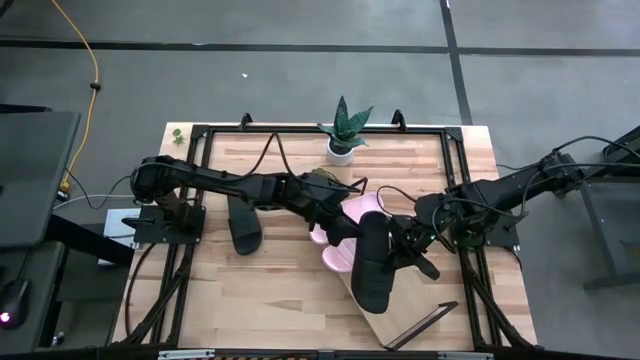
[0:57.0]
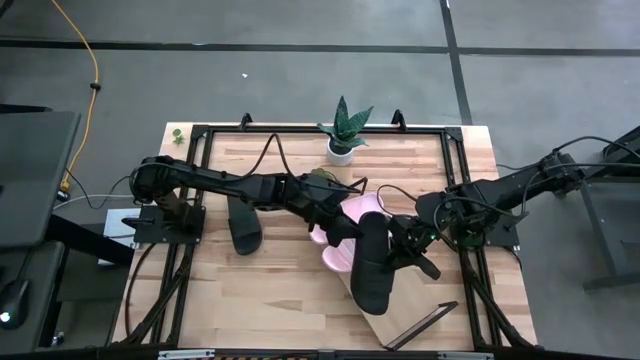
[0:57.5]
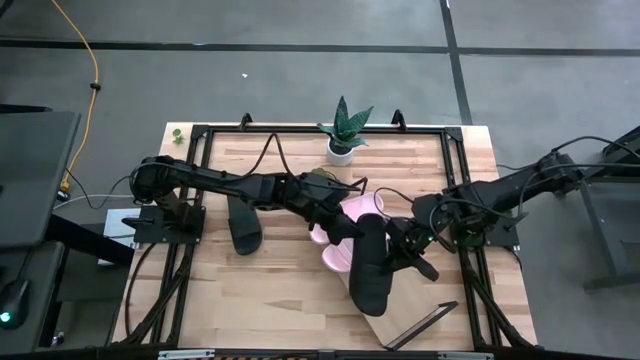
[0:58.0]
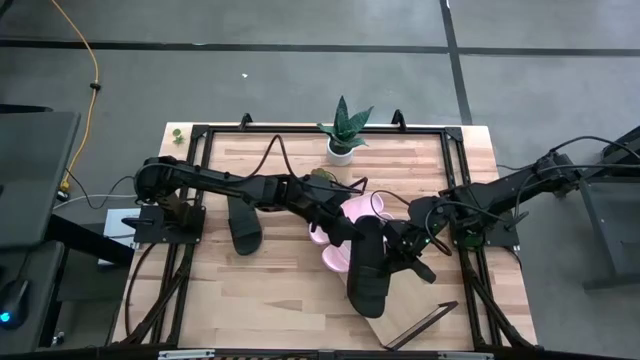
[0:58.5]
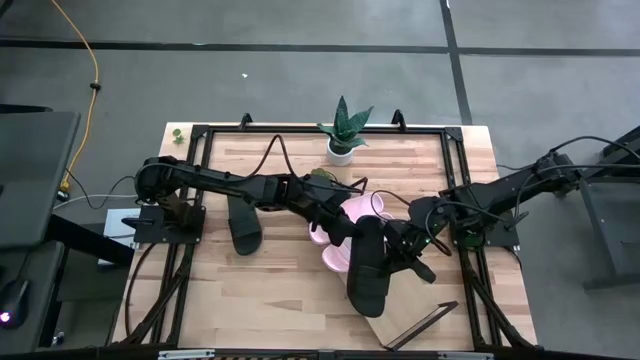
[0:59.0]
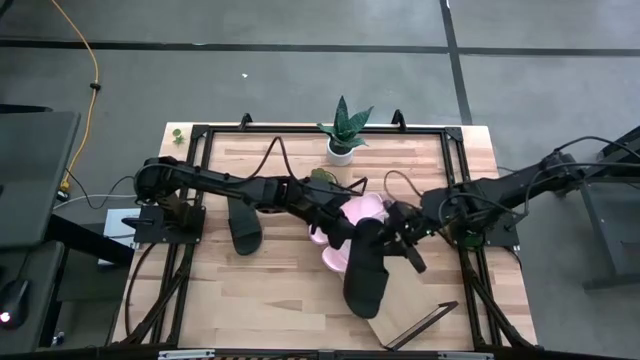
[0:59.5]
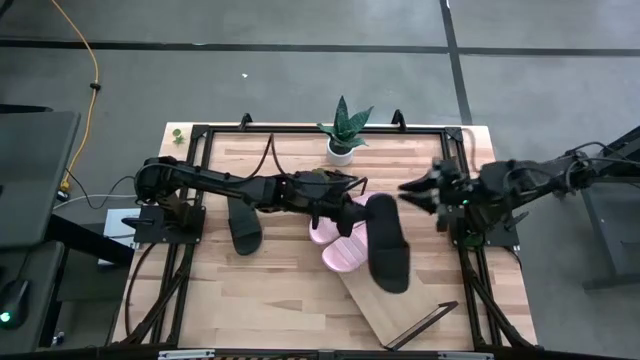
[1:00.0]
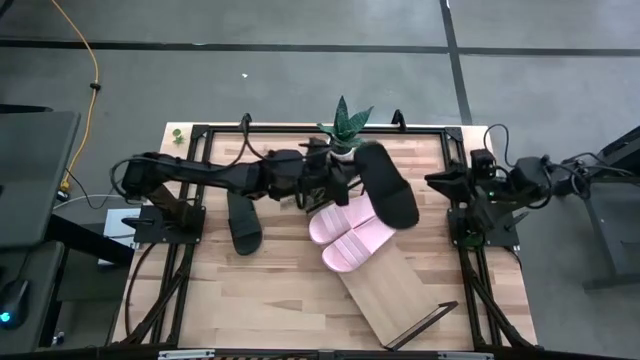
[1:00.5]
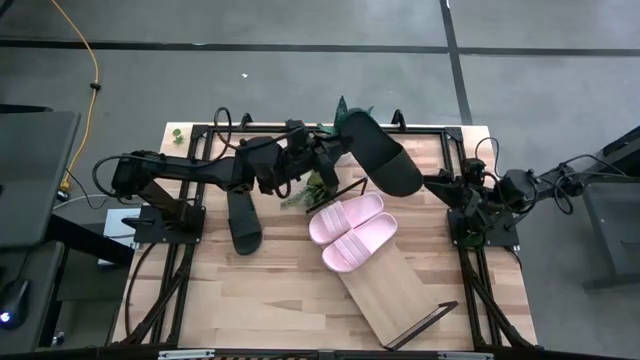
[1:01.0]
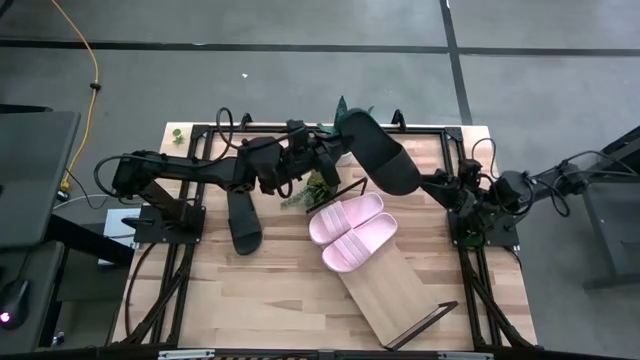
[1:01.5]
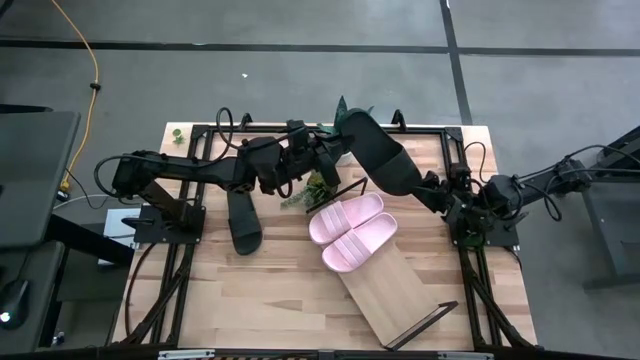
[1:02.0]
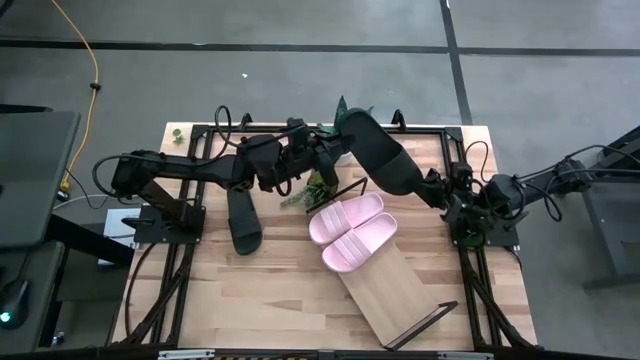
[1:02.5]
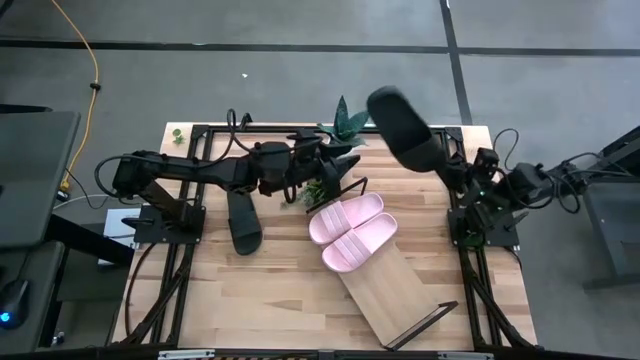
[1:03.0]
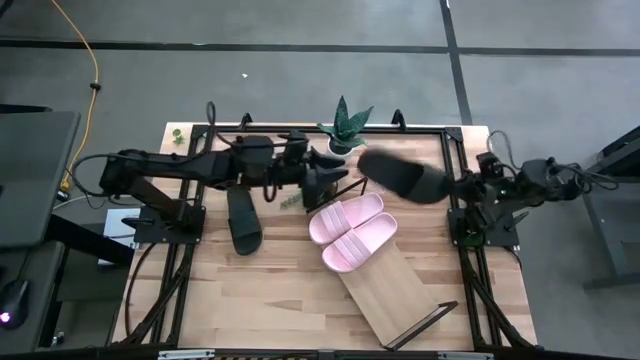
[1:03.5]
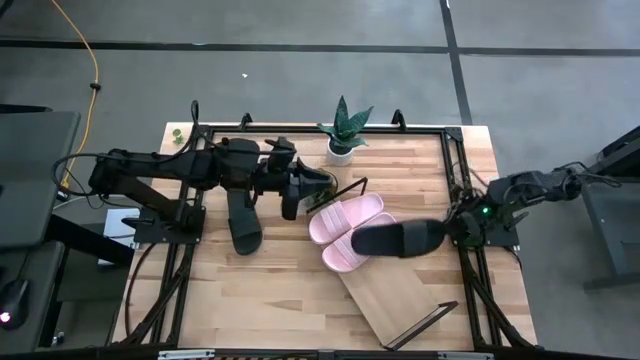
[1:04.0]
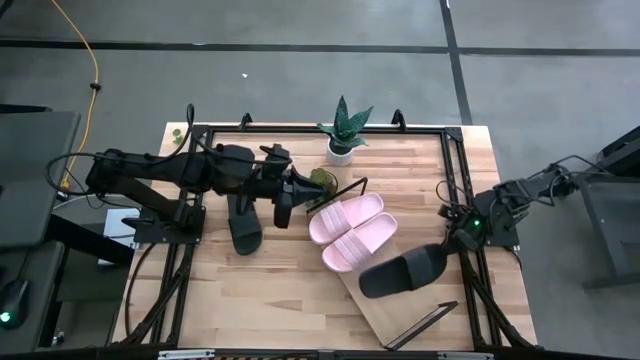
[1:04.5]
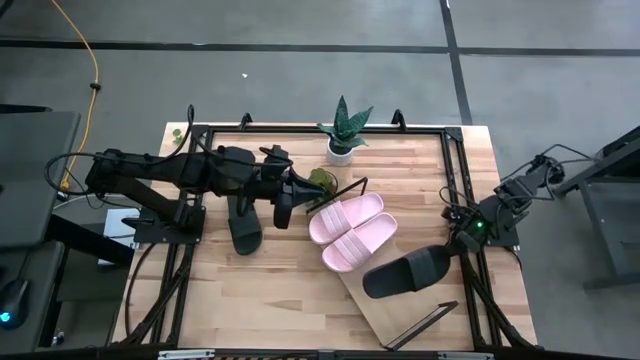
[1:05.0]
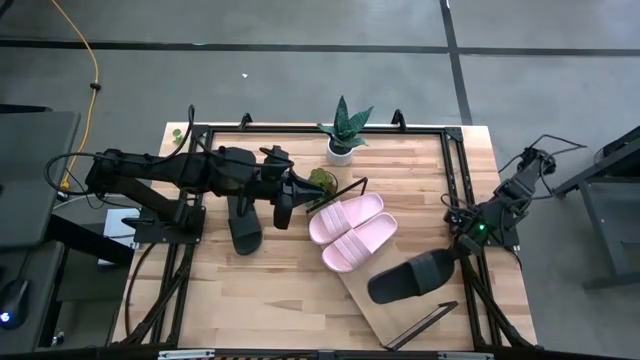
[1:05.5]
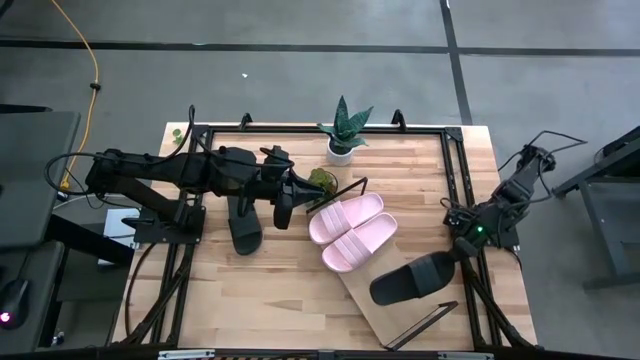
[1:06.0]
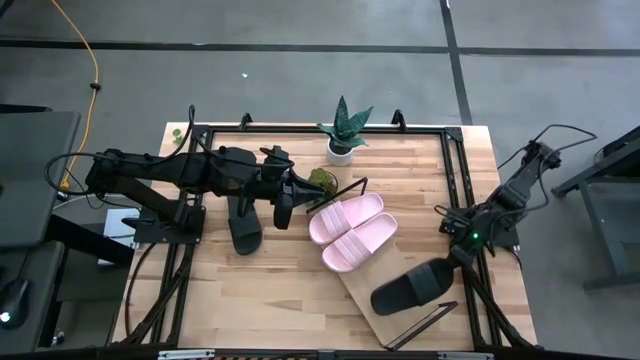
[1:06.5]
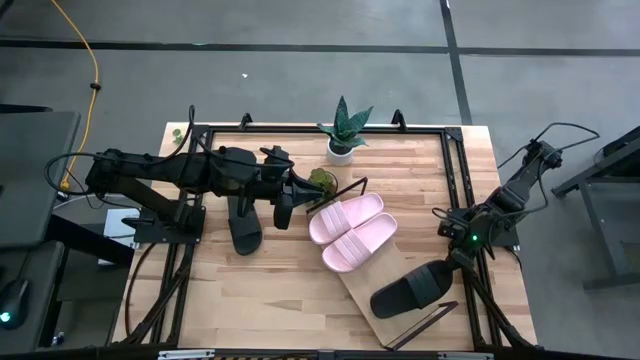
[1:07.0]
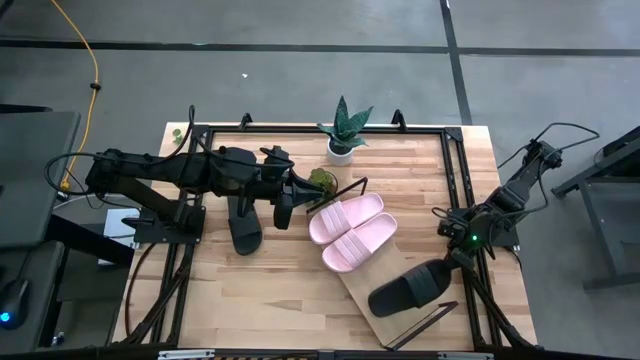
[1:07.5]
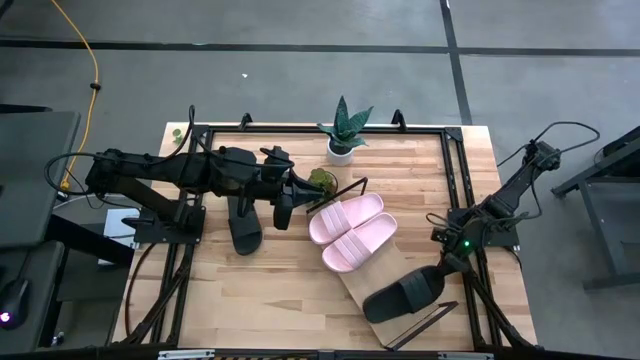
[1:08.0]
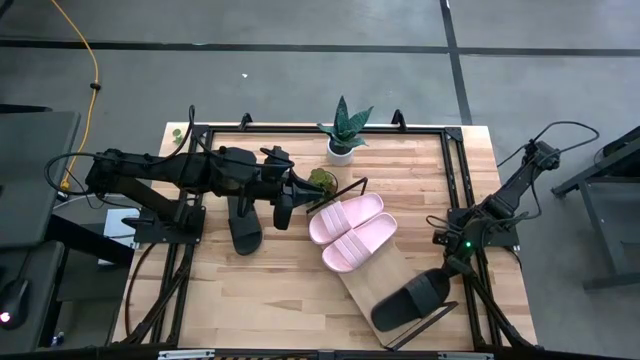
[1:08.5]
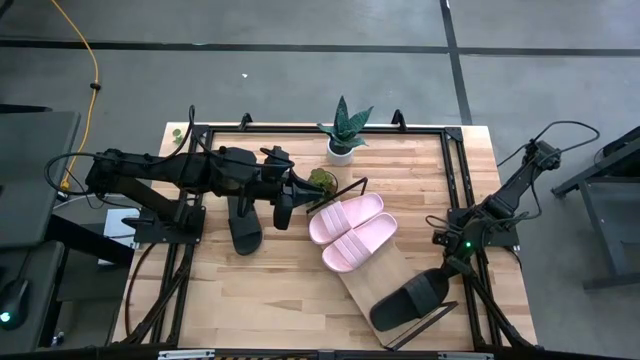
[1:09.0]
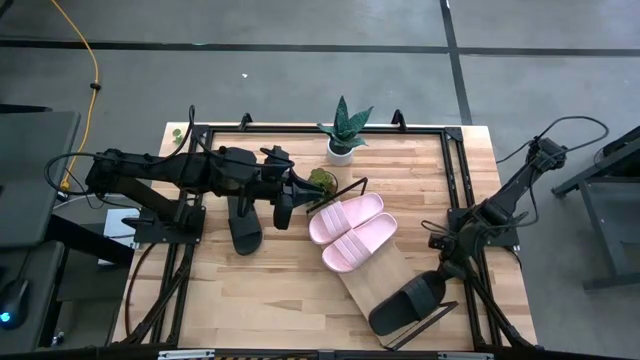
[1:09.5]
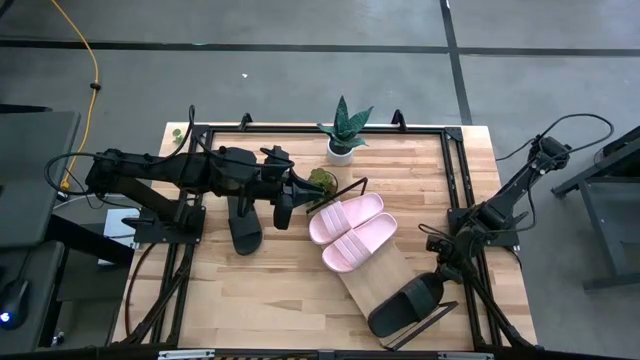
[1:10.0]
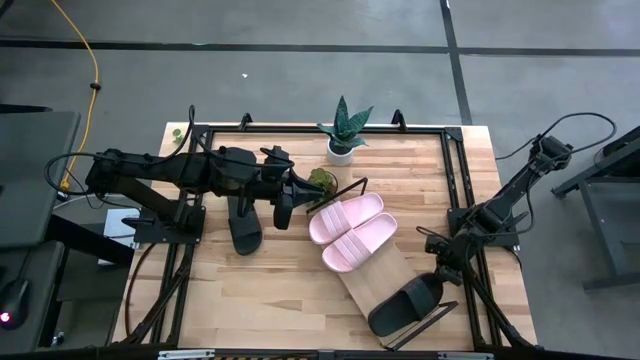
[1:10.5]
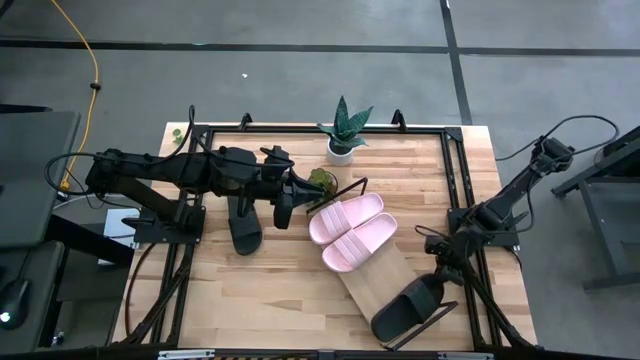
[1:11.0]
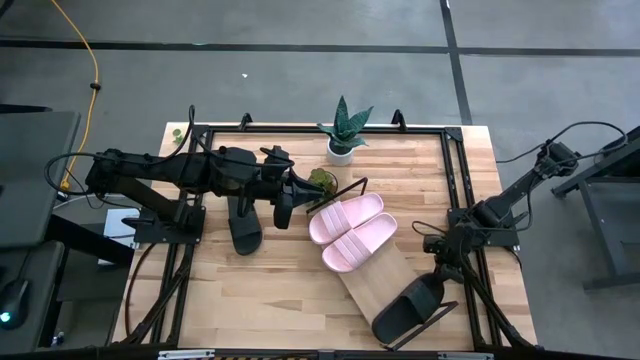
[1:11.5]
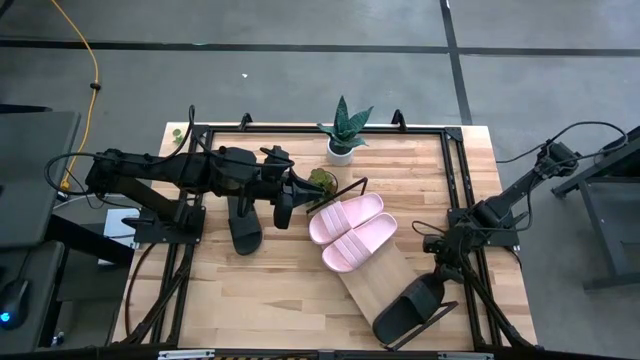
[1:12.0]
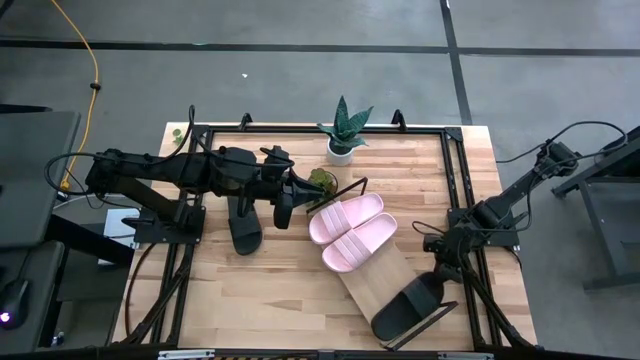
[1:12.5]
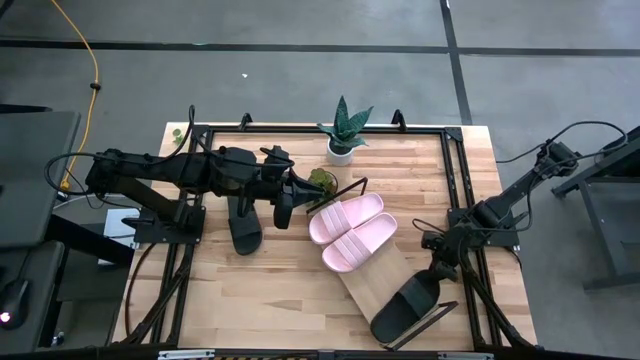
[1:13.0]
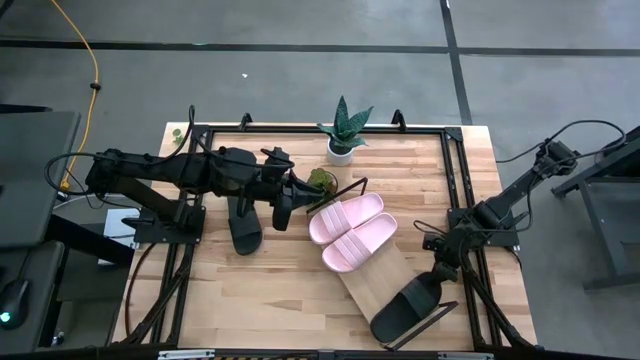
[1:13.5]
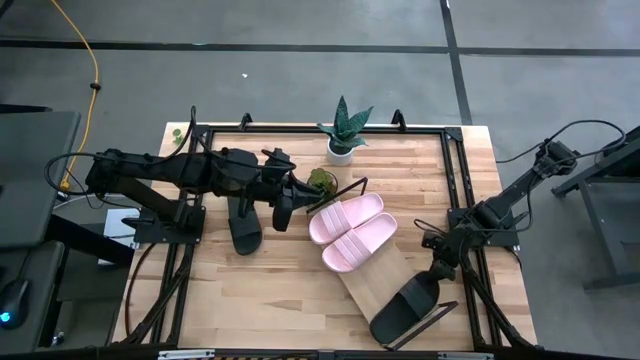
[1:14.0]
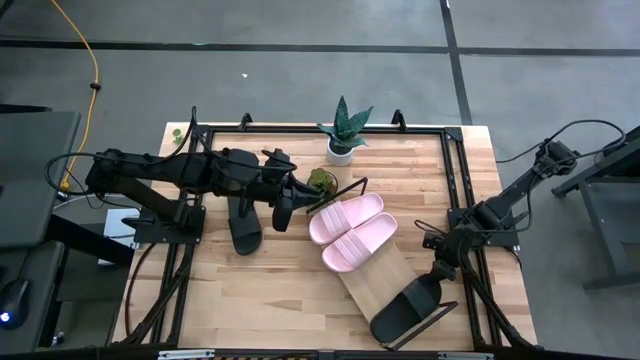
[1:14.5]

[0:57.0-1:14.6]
Task: Pick and place slides into the shelf
Put the right black slipper on the shelf

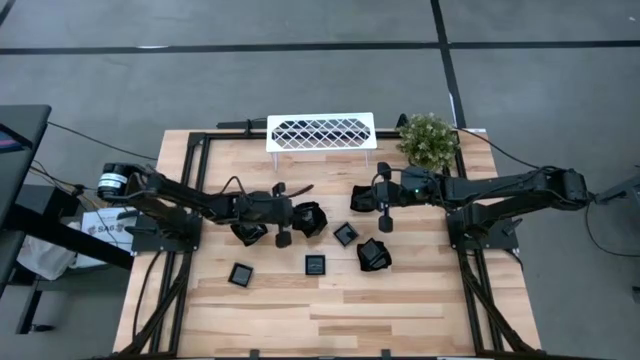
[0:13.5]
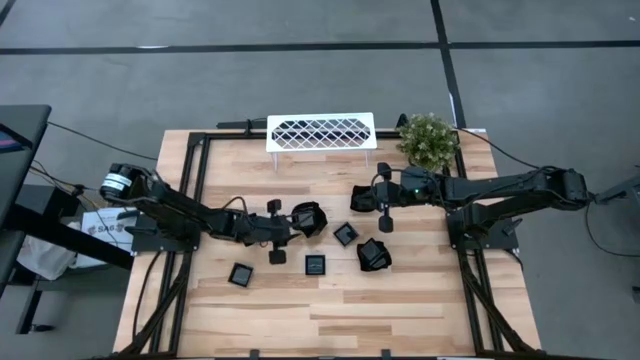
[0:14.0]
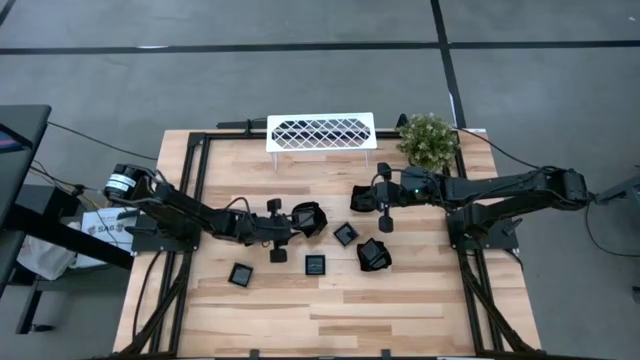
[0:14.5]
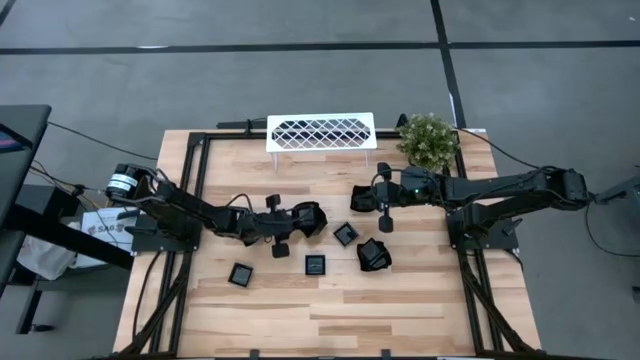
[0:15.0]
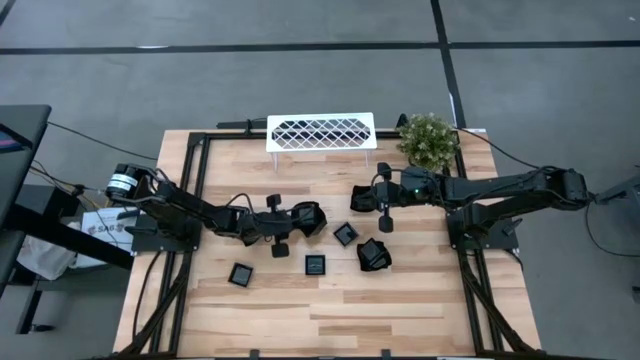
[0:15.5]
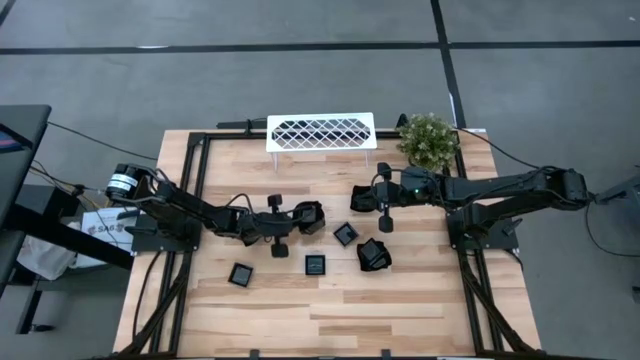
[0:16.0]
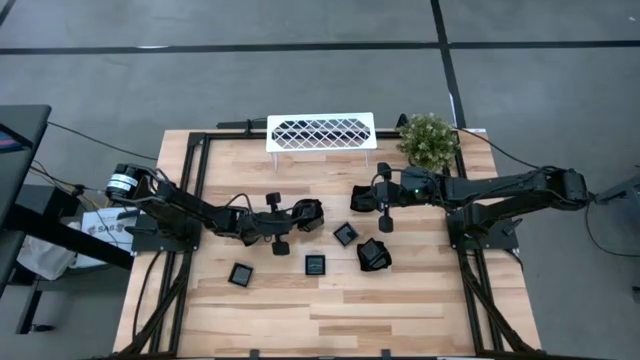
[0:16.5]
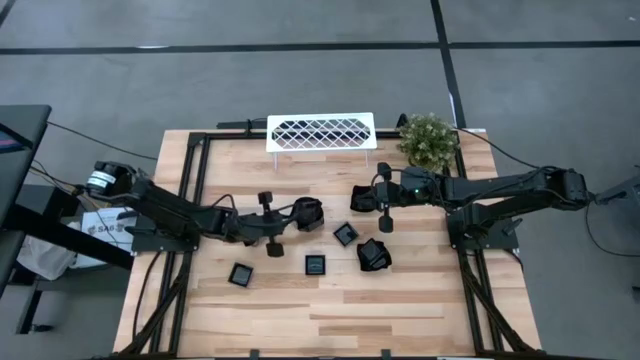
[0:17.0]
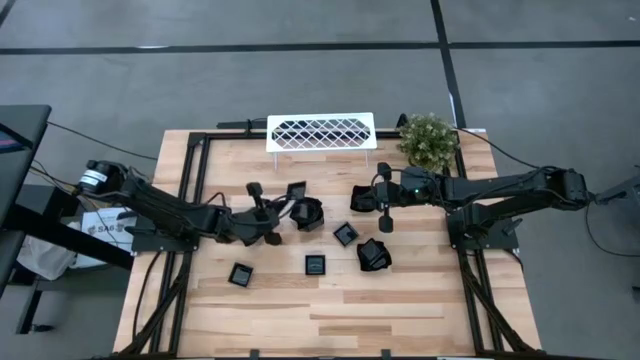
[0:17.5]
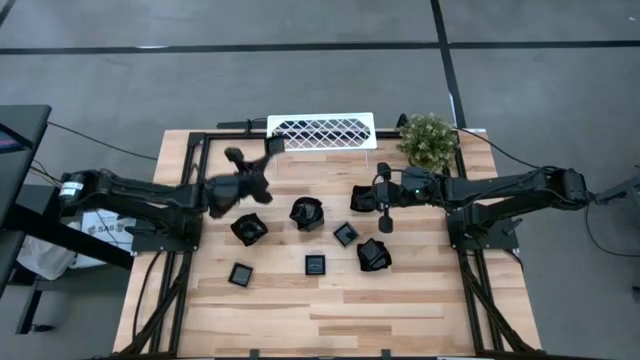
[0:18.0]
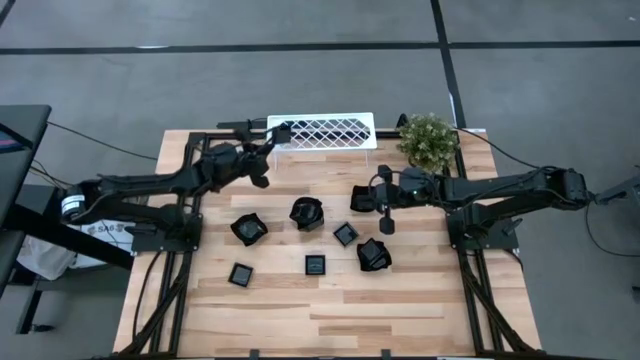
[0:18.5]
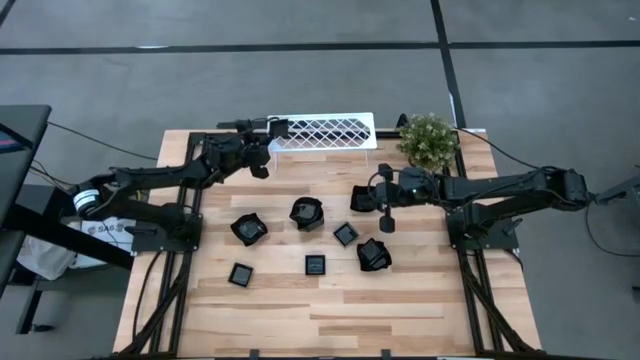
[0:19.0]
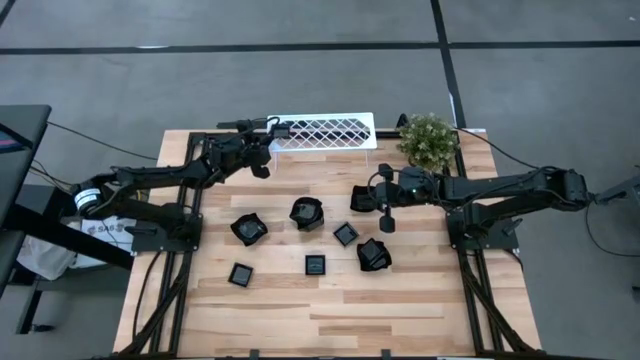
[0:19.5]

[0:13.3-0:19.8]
Task: Pick & Place Mini shaped plates
Put the black square plate on the shelf
